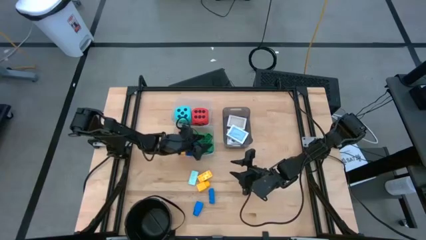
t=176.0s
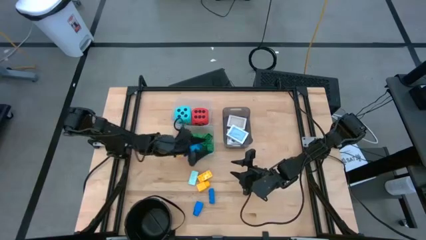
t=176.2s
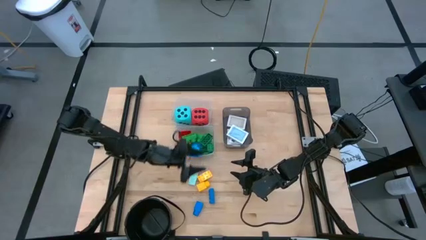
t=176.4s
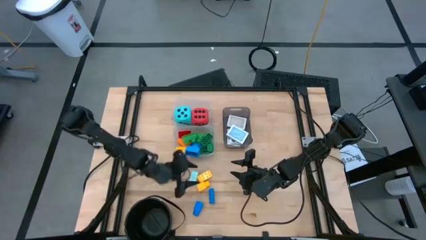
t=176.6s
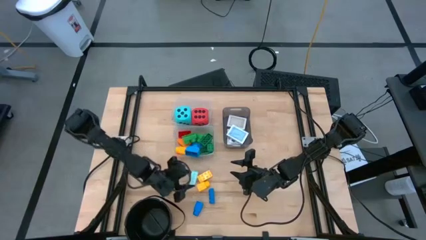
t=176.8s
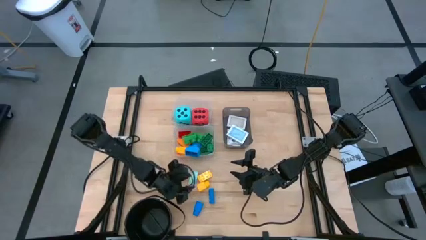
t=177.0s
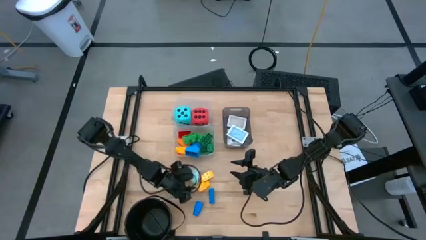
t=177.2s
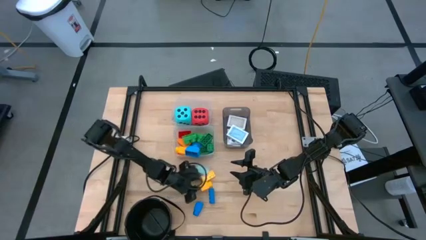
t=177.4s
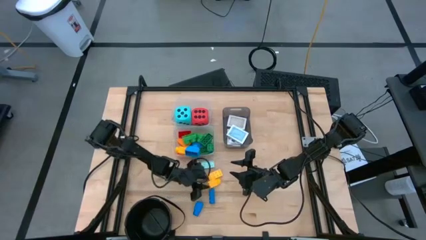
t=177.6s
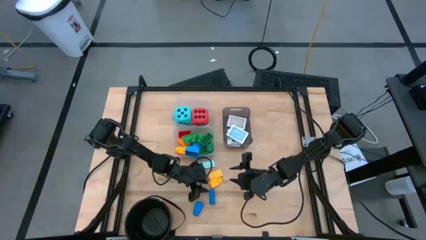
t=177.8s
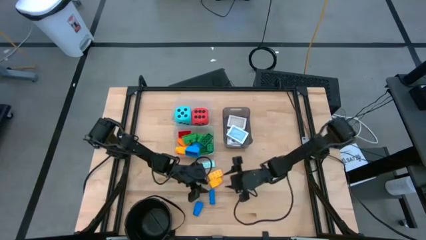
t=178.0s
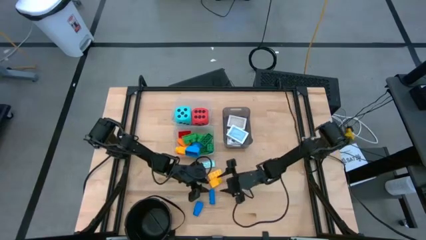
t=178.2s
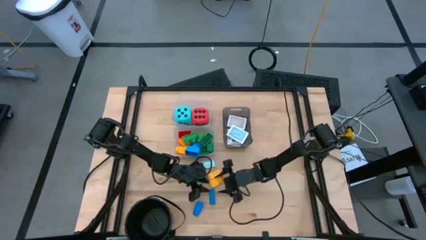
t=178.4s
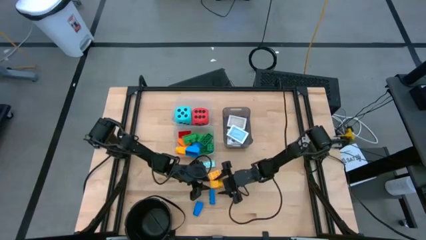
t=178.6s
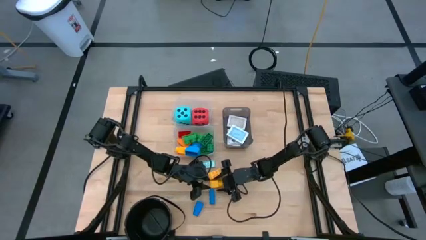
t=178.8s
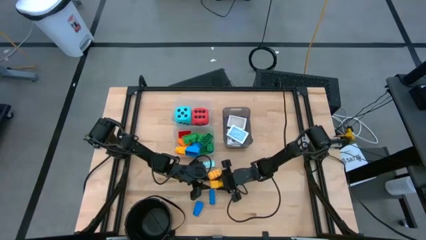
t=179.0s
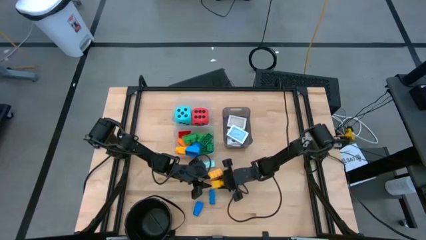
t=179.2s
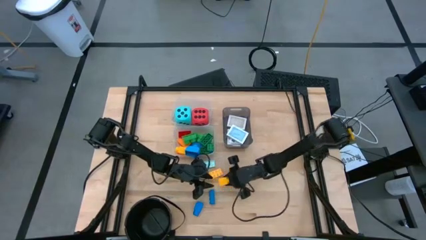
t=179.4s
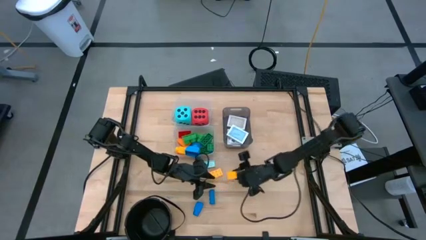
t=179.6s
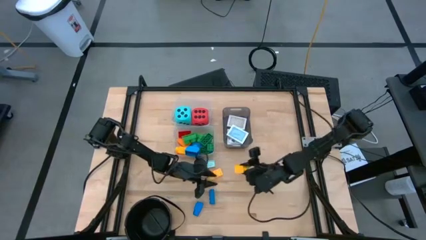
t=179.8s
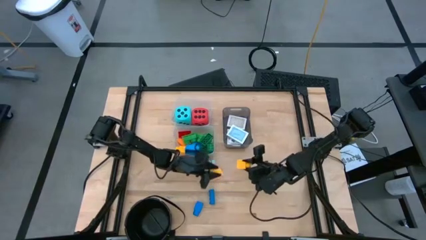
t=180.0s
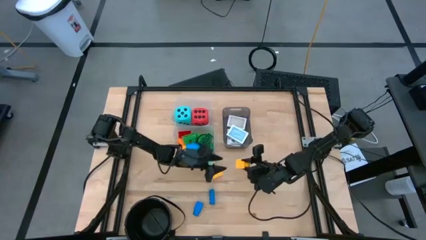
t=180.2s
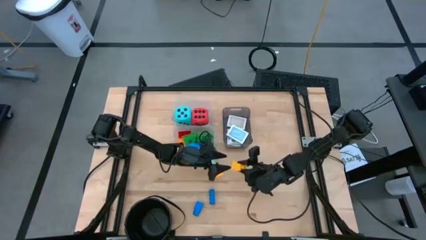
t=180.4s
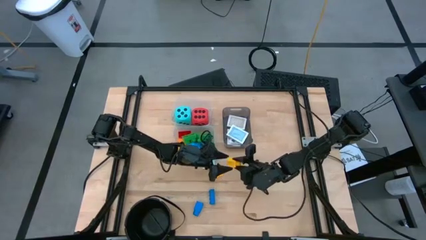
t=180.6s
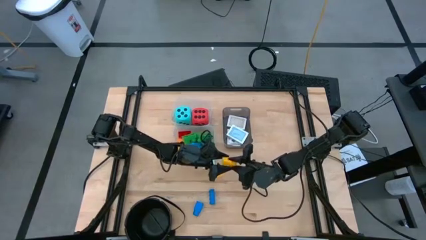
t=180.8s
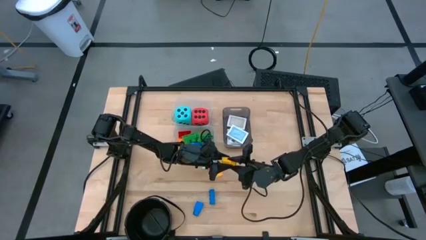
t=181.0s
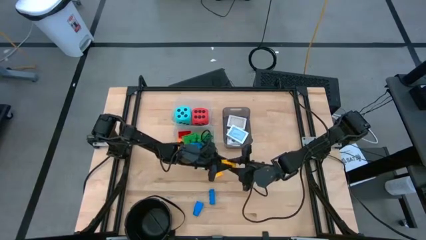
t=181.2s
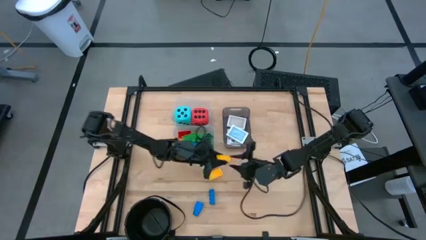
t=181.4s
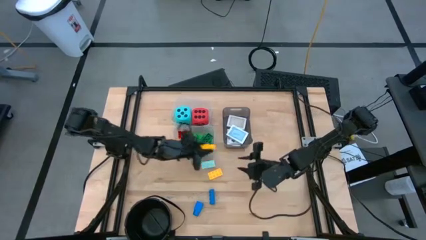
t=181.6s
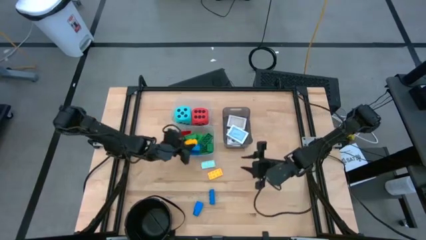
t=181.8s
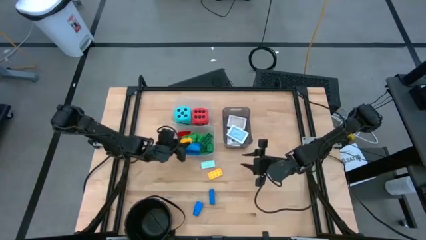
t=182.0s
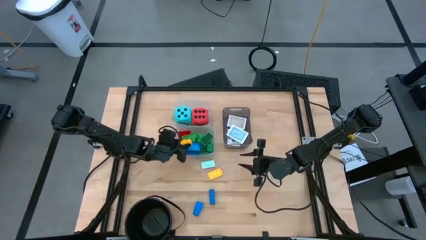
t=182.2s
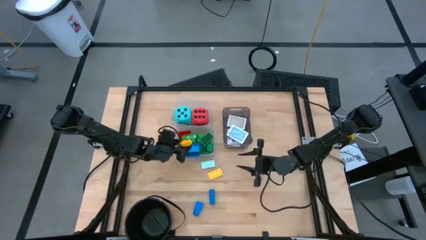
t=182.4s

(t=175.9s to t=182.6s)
Task: Pick & Place Toys
Put the yellow game piece into the bottom transparent bin

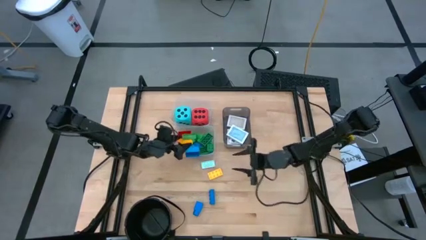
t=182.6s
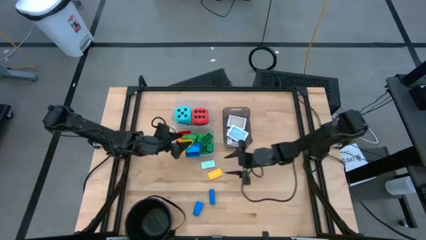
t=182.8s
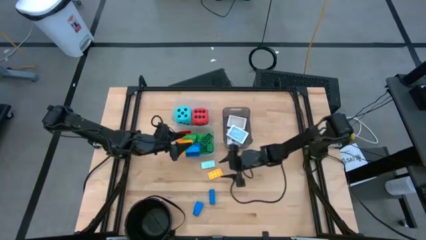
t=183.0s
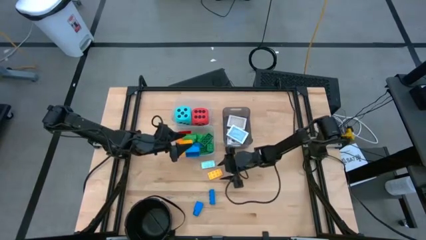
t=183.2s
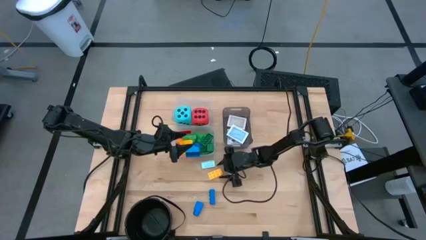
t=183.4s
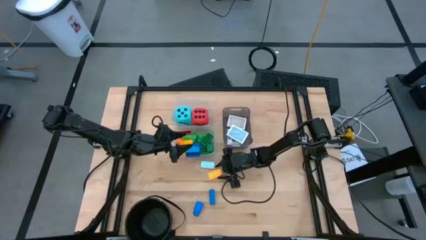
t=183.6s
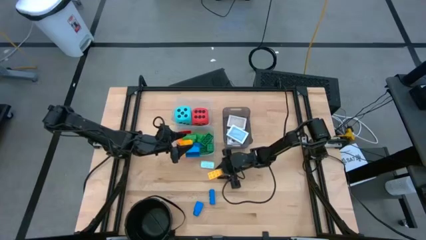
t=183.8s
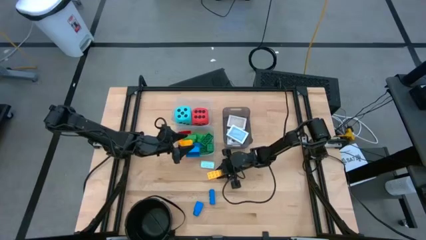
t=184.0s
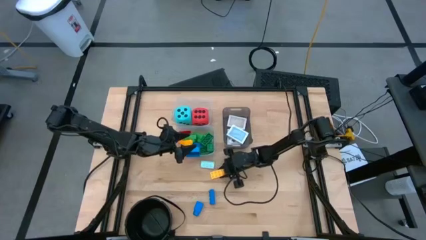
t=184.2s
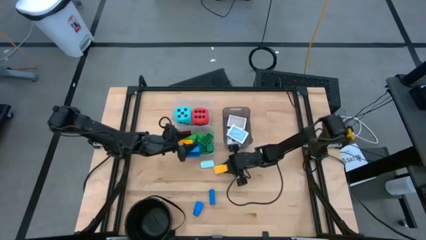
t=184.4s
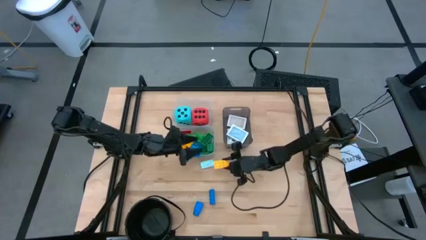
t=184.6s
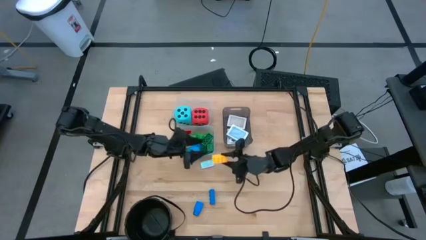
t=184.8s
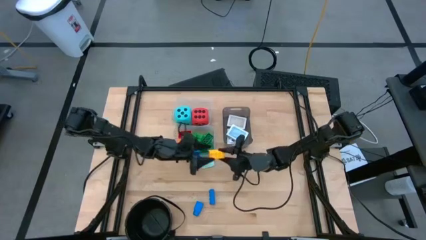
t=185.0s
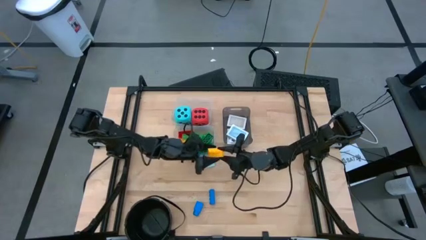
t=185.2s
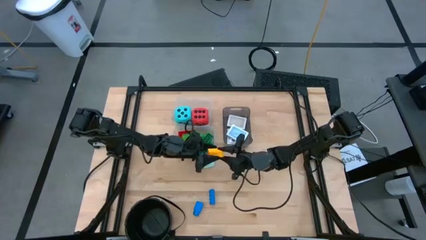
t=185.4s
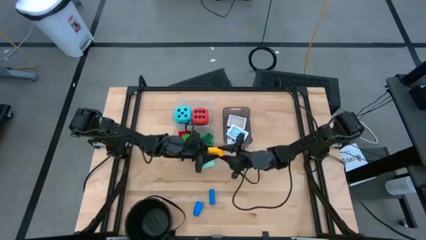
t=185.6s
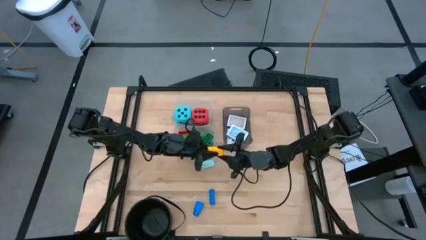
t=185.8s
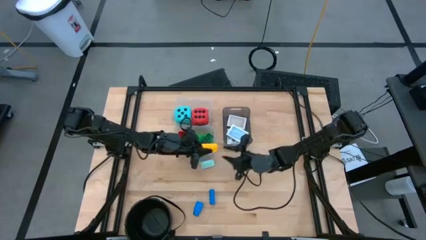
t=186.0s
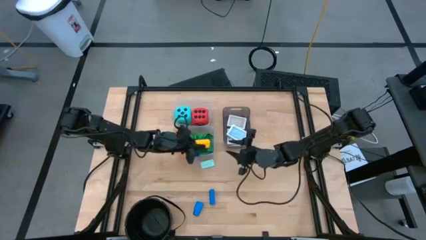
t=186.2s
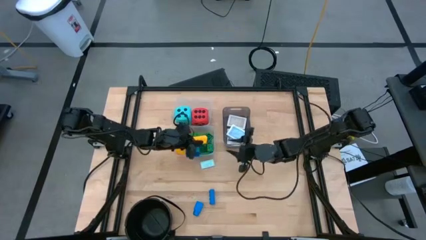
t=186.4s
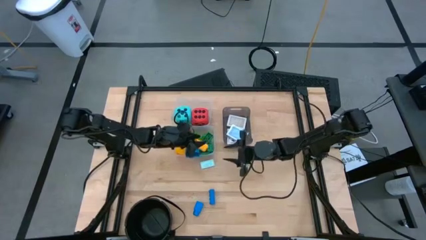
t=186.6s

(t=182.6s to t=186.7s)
Put the yellow game piece into the bottom transparent bin

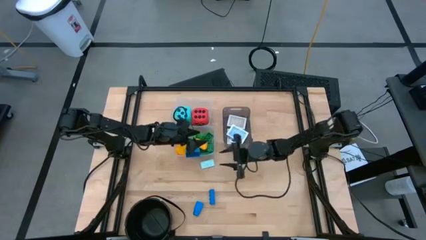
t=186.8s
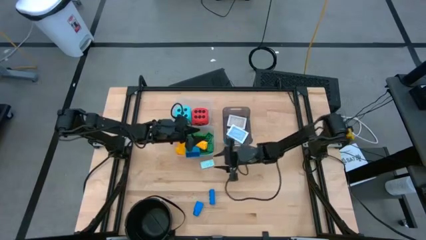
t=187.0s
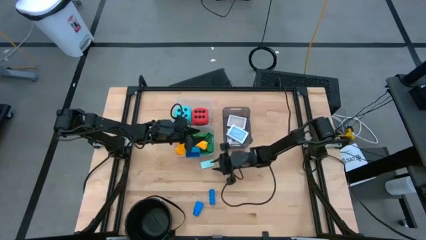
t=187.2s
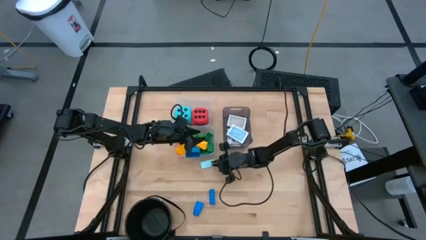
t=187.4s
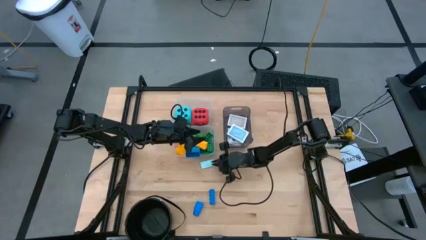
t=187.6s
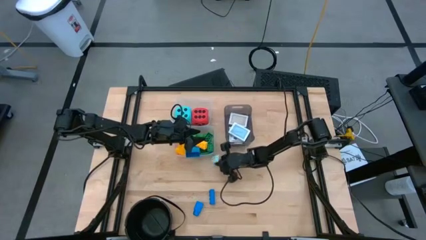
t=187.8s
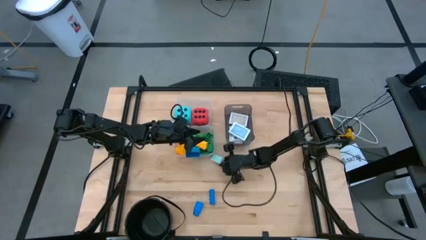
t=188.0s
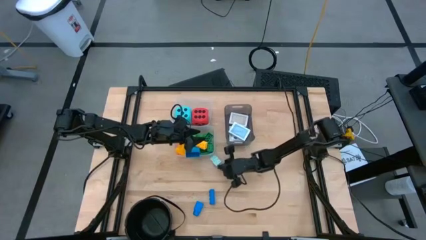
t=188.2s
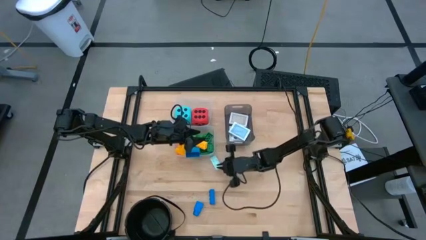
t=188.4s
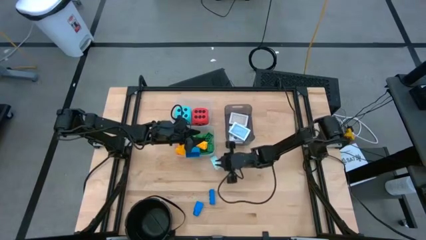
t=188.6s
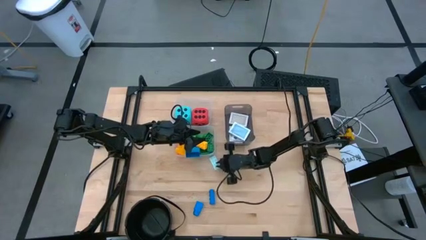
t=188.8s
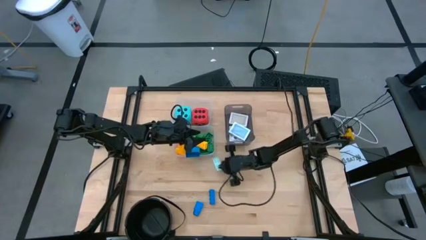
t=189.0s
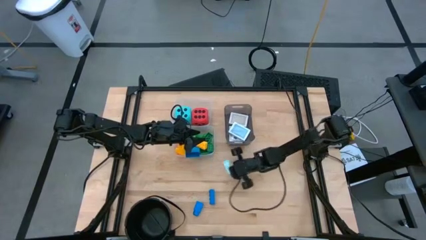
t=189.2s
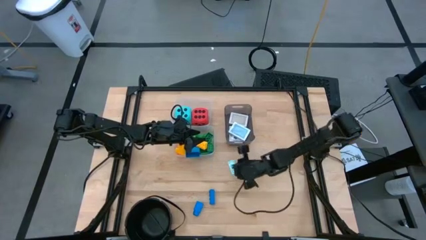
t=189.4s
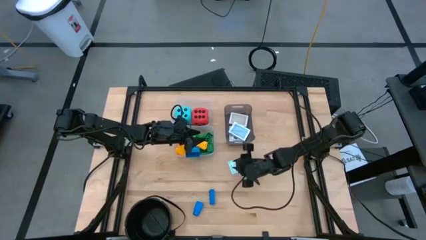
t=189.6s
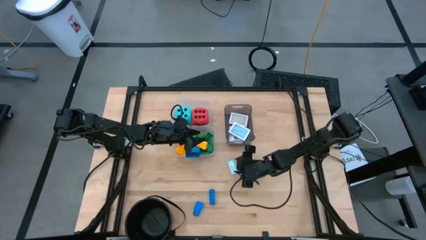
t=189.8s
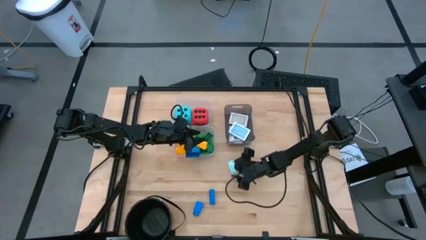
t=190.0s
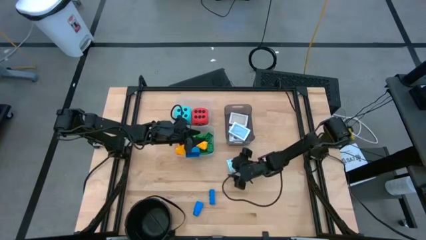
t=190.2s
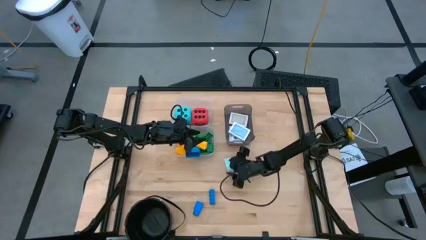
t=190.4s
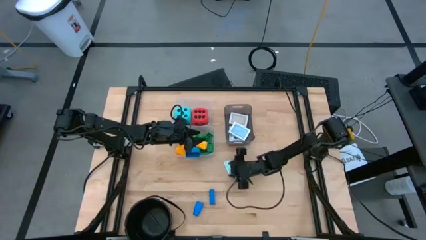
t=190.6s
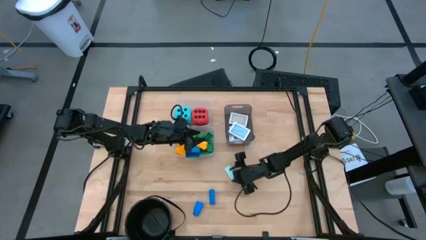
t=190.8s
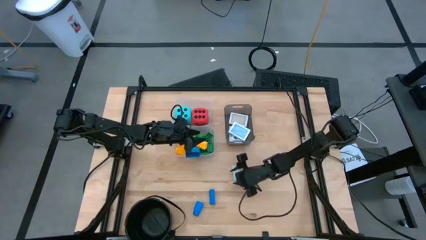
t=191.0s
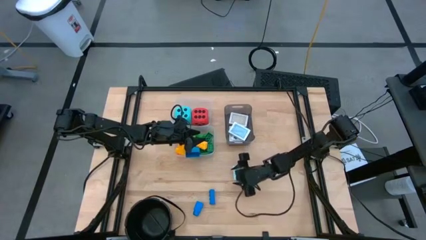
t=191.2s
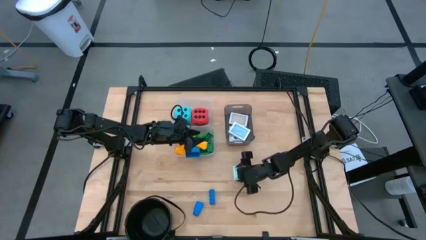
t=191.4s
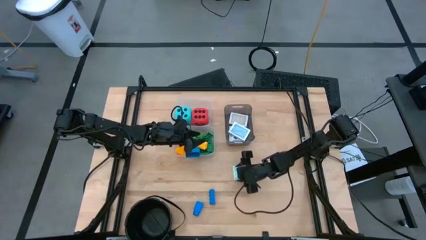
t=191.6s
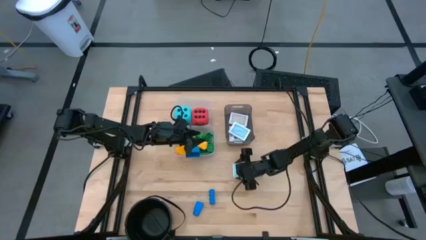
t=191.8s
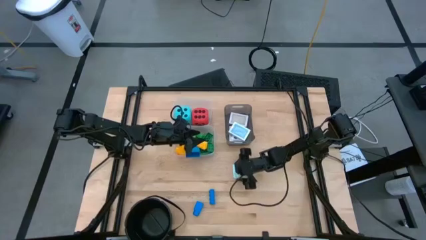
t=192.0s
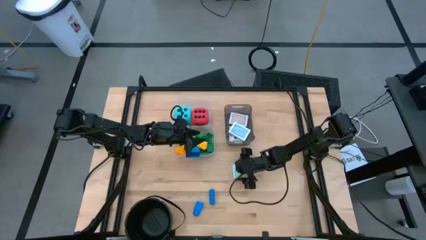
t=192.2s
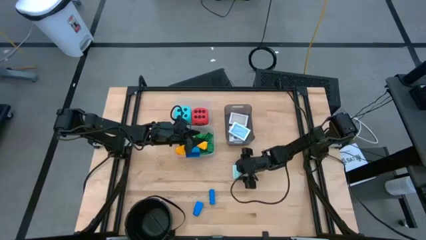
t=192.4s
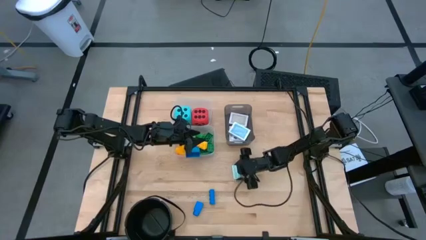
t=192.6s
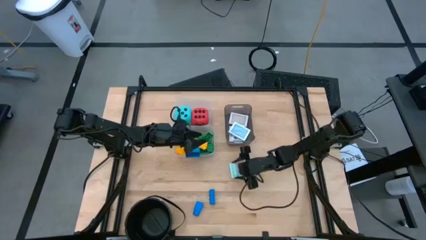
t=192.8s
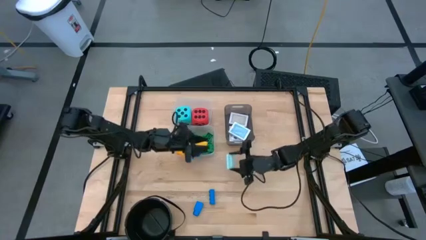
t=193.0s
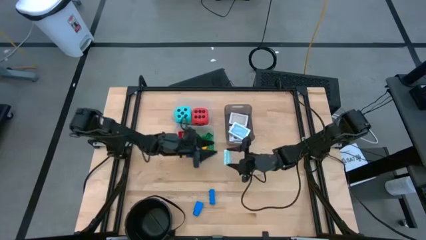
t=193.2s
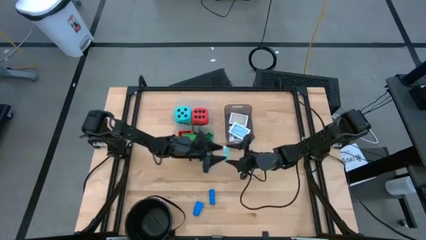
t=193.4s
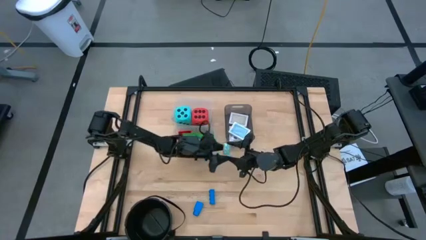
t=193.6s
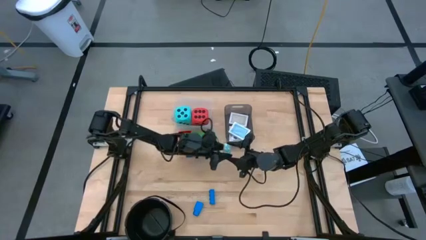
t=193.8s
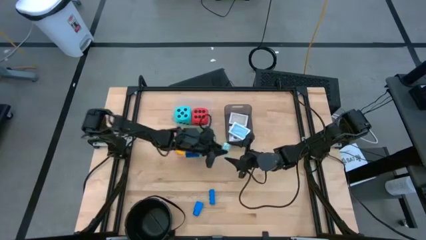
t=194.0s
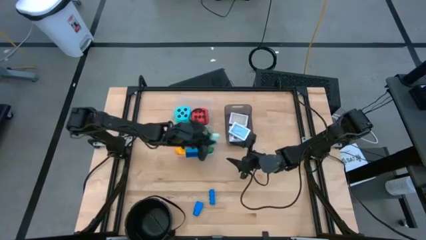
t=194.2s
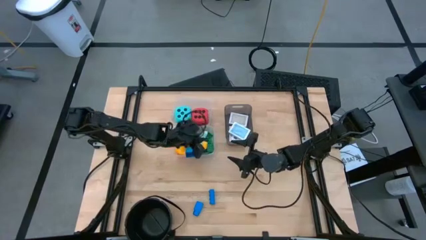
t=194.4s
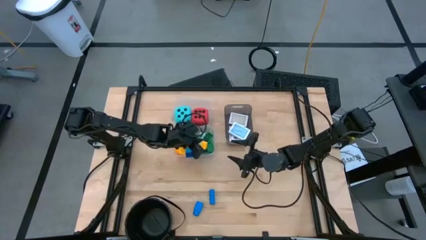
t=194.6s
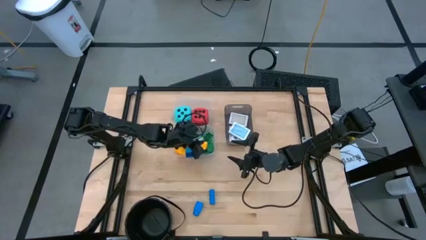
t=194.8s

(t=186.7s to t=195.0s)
Put the light blue game piece into the bottom transparent bin
